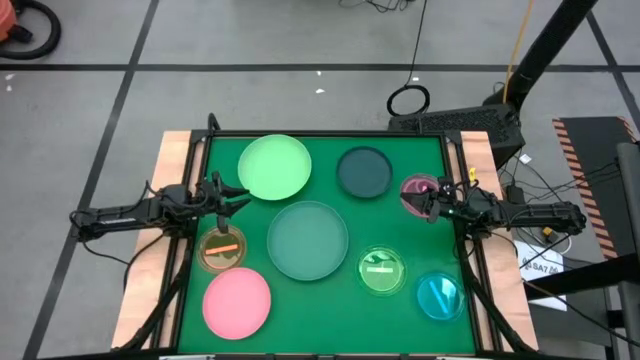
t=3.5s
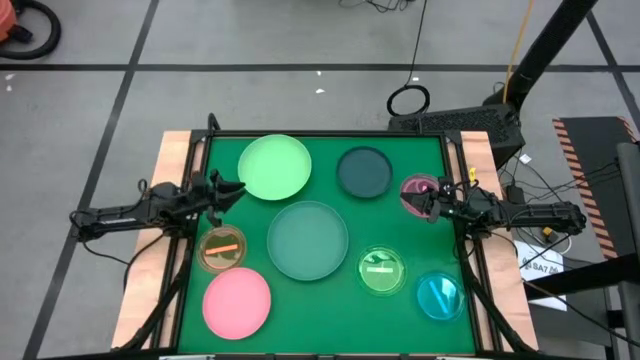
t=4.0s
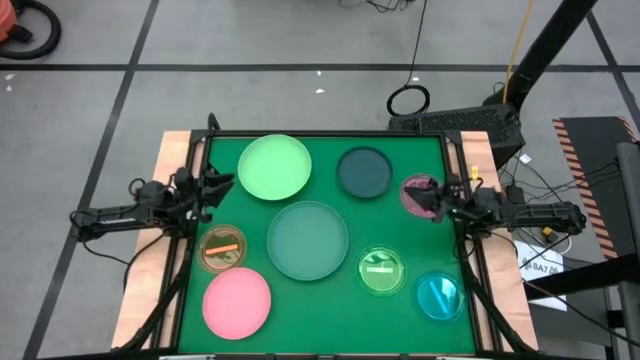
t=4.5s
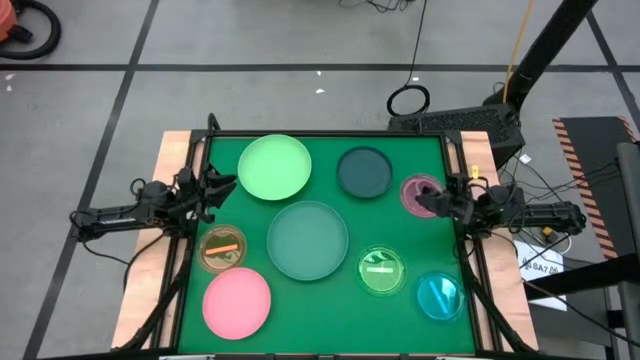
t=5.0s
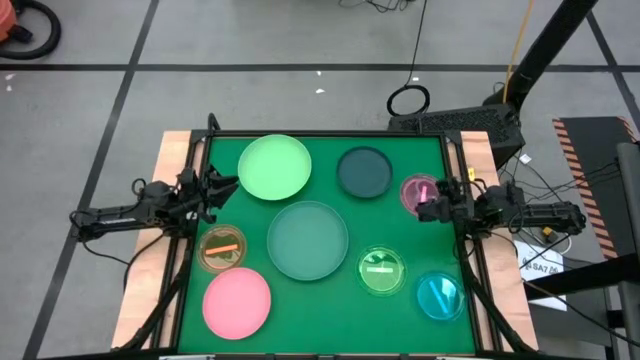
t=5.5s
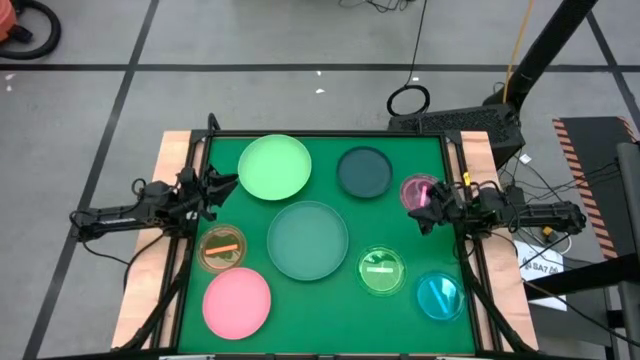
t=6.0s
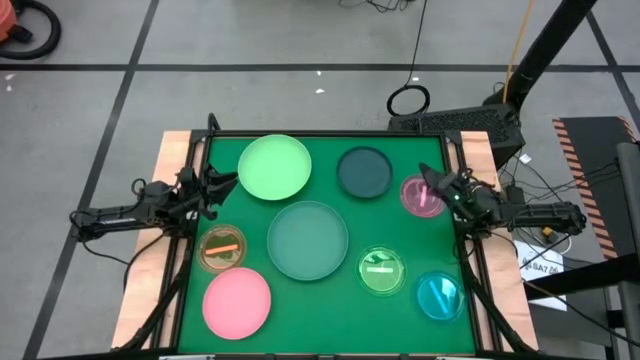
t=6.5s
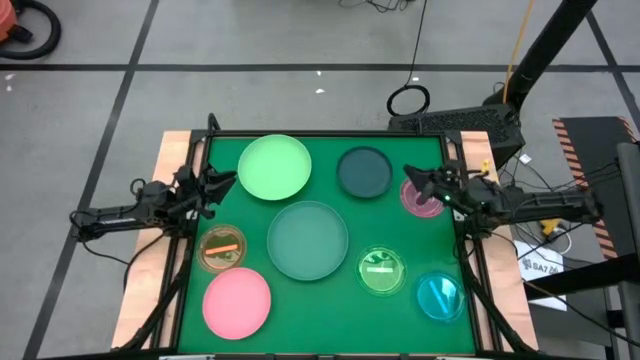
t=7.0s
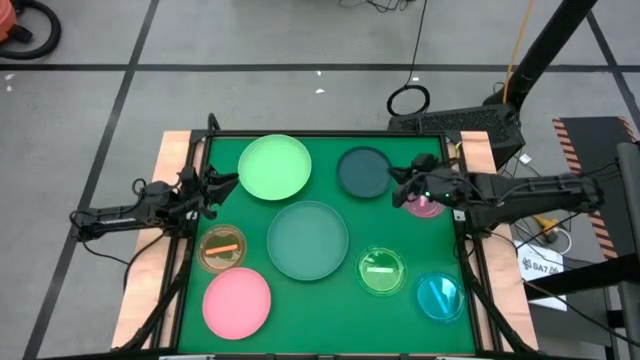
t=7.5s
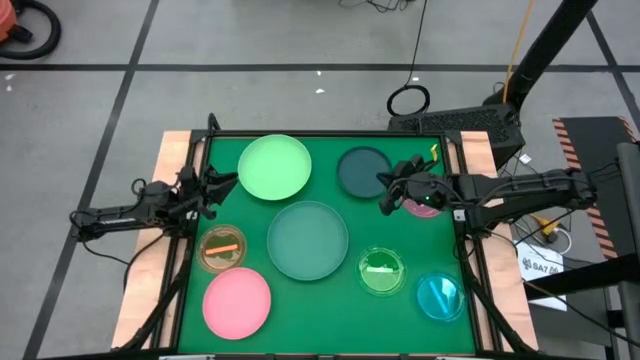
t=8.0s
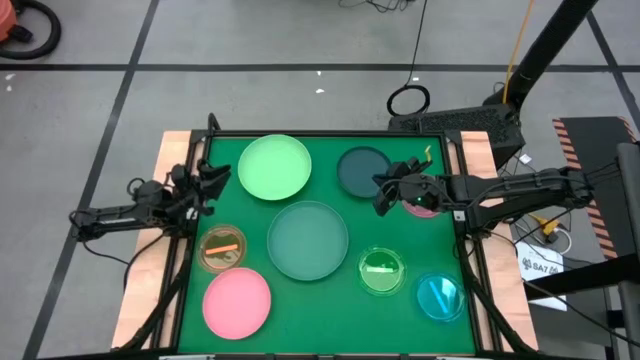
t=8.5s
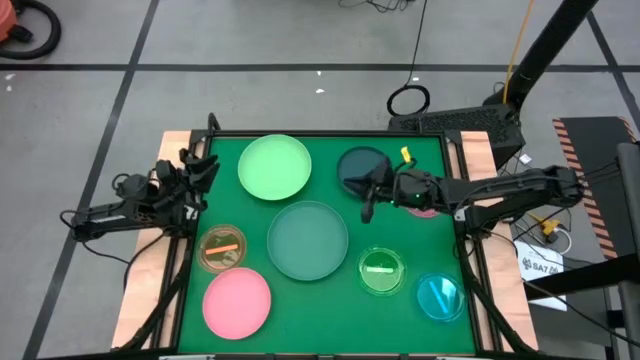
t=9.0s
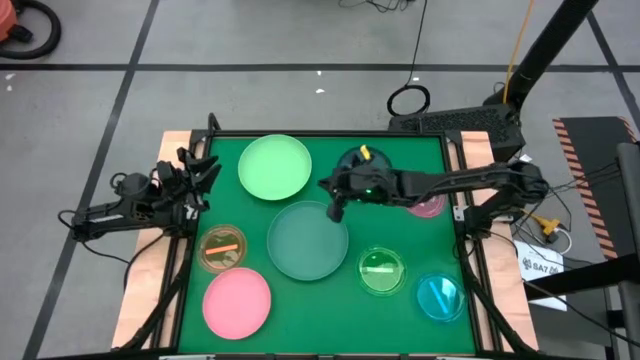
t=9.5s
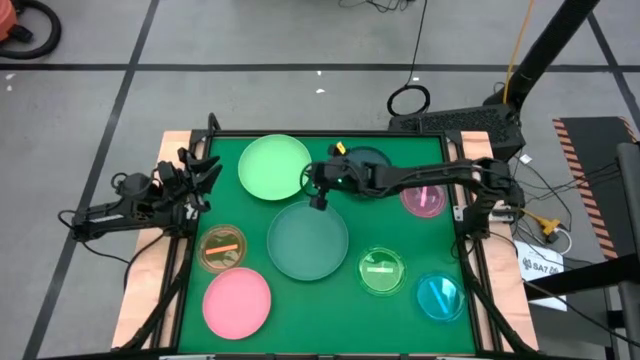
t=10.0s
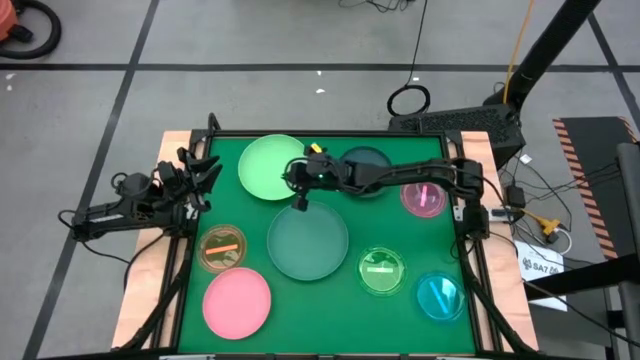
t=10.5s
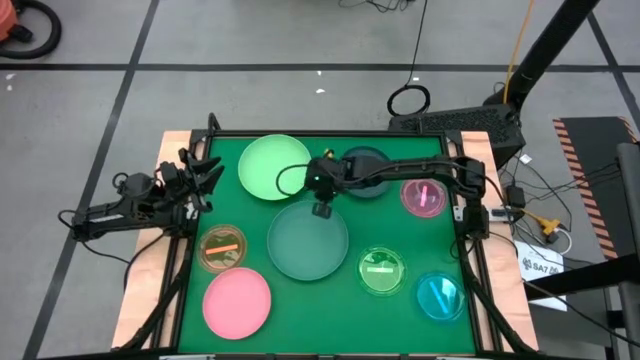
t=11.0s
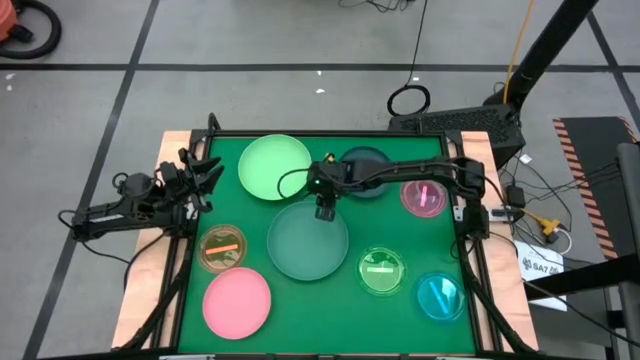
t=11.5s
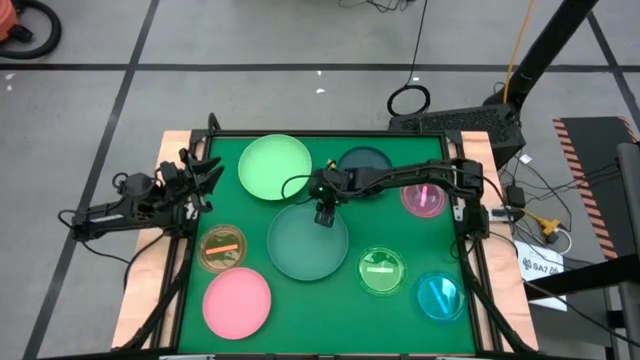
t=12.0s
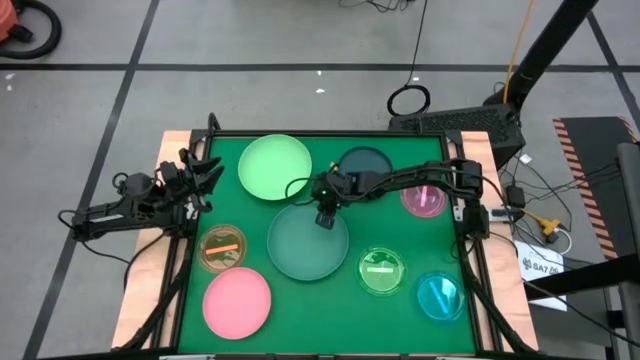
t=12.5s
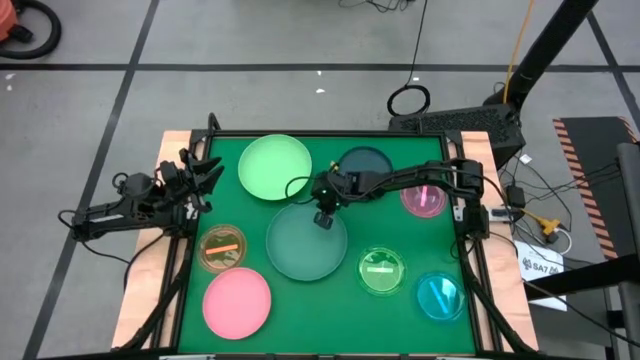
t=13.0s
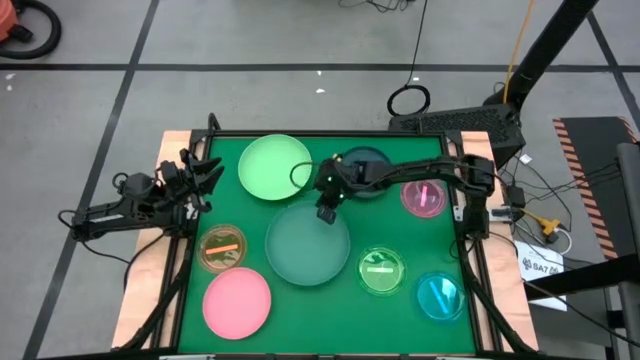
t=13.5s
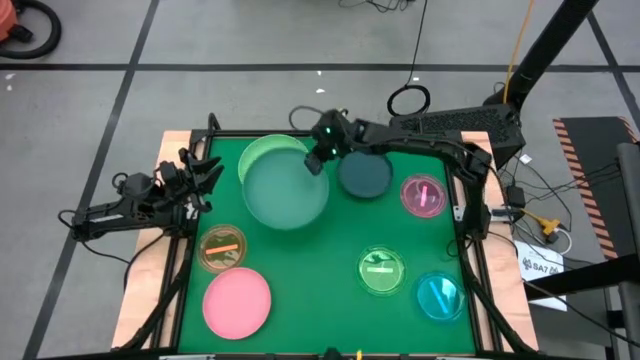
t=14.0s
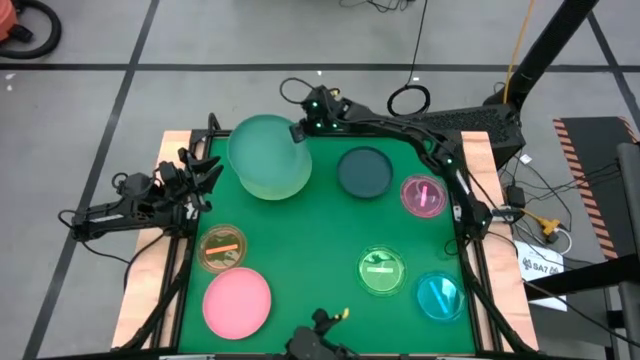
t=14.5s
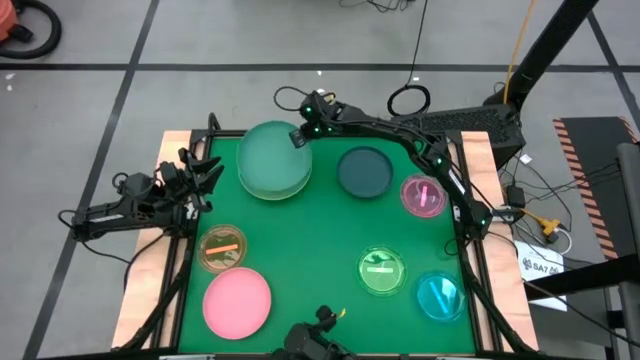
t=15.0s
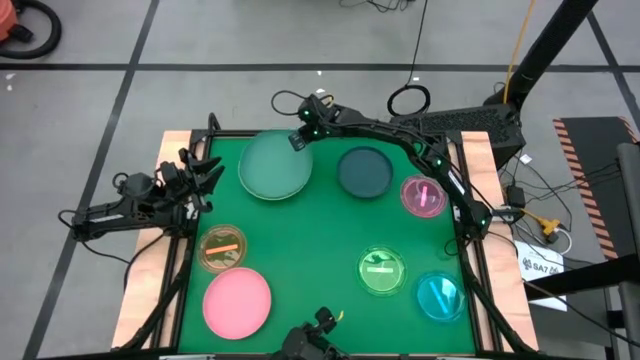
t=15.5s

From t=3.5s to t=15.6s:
Task: Stack plastic plates
Stack the dark green plate on top of the light green plate

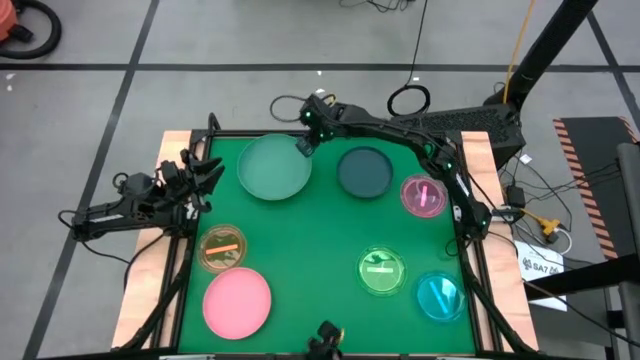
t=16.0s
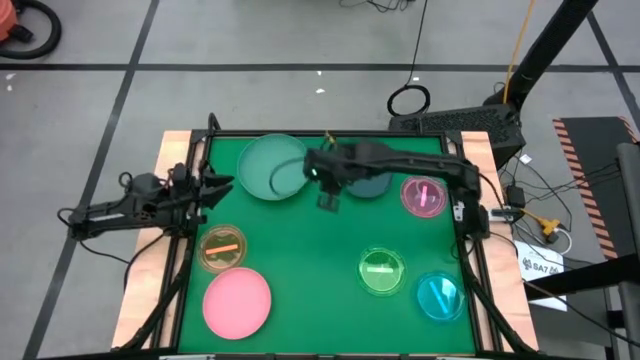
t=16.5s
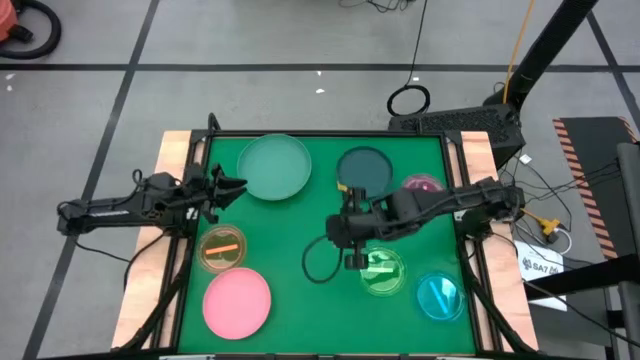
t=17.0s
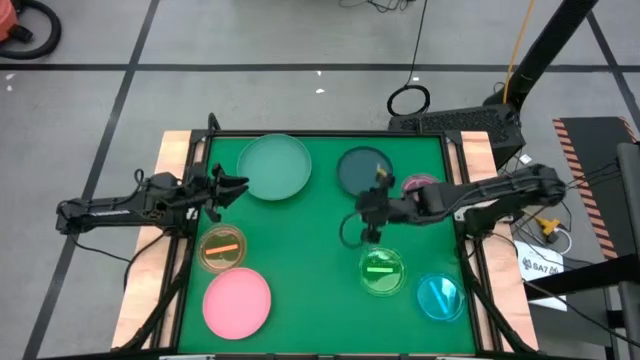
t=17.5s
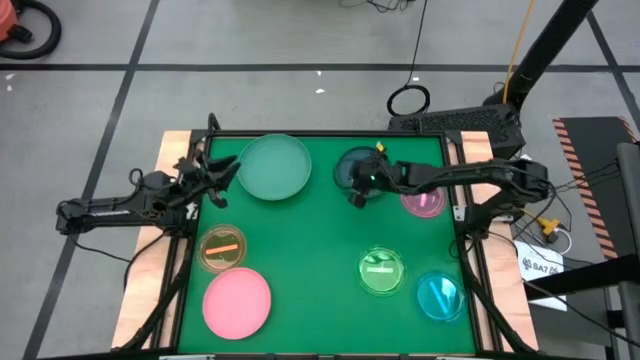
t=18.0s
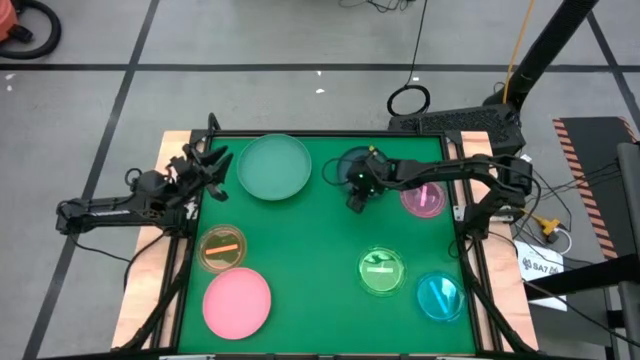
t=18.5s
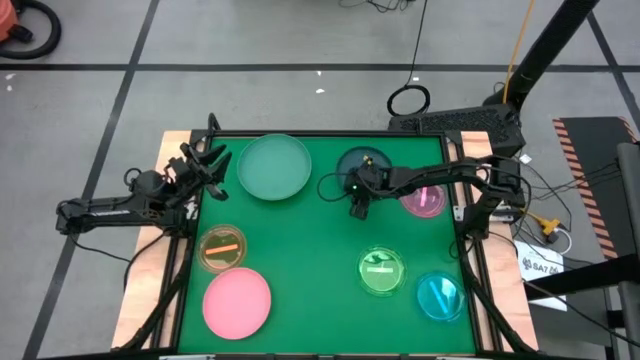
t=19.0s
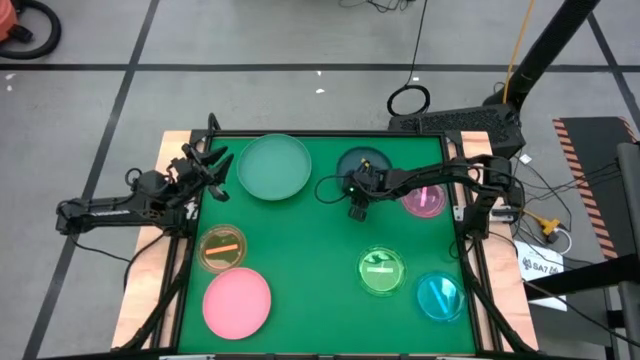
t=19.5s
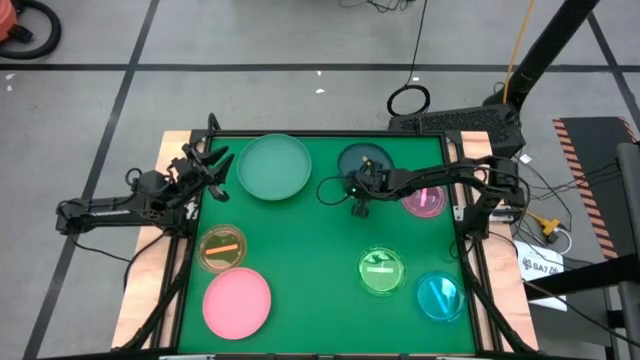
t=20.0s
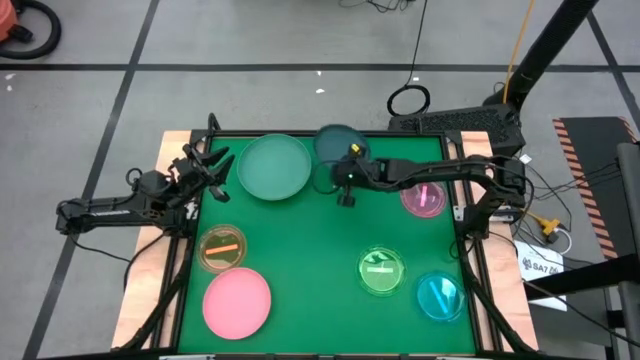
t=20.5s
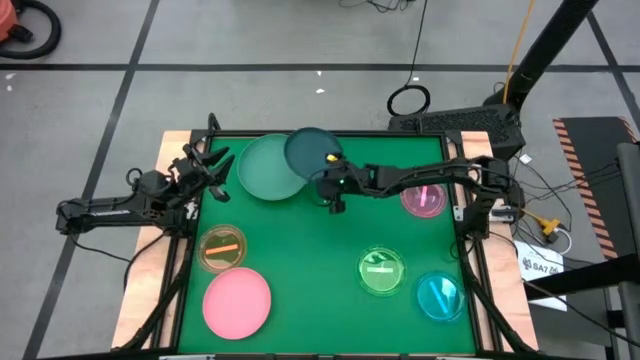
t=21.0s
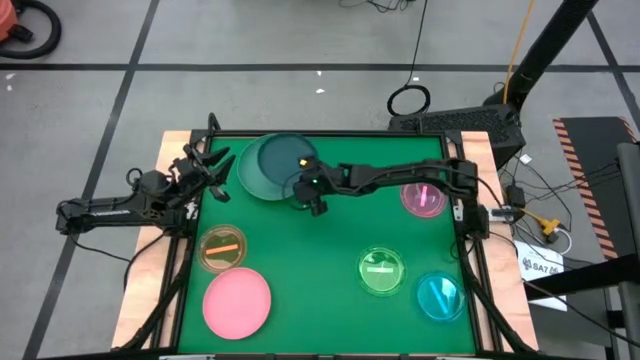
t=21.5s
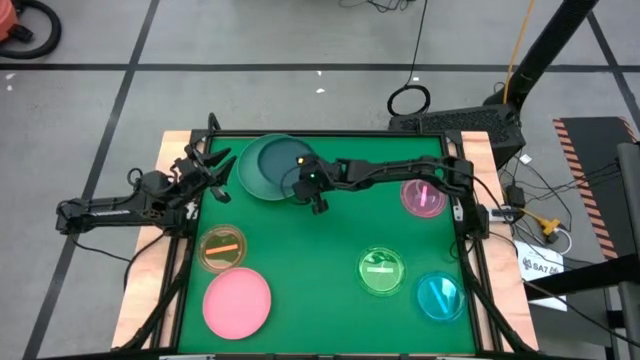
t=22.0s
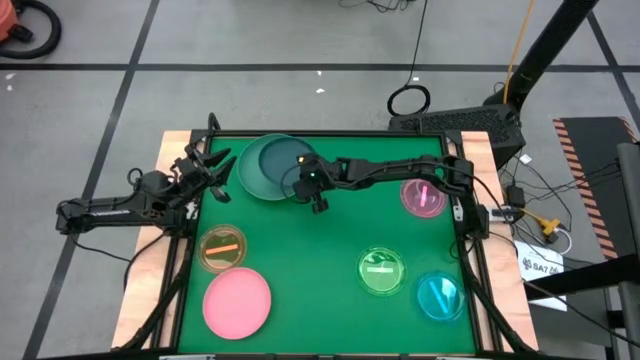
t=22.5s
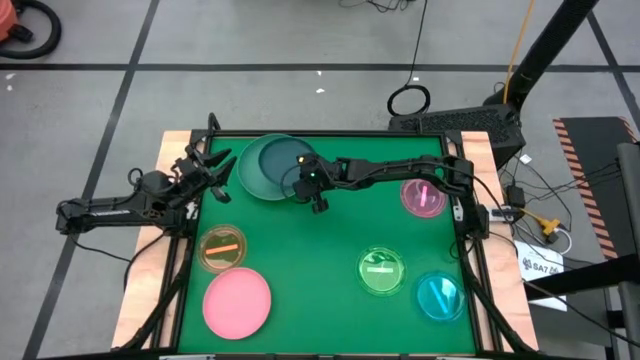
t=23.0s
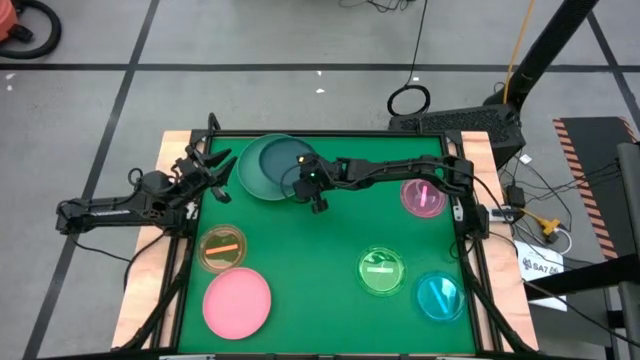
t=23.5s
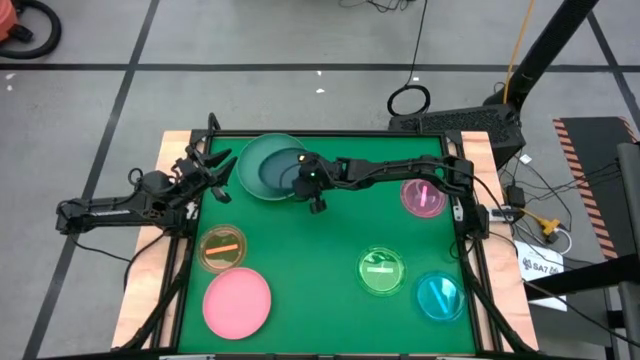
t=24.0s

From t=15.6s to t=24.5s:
Stack the dark blue plate on top of the dark green plate

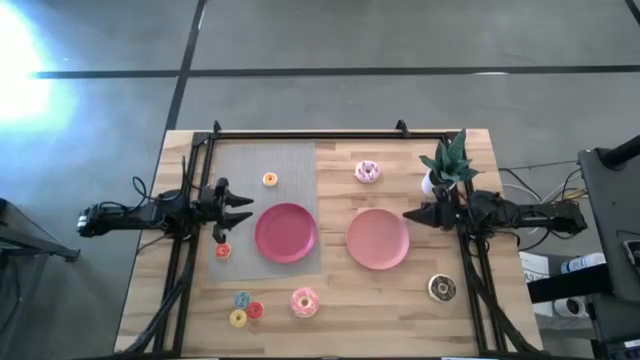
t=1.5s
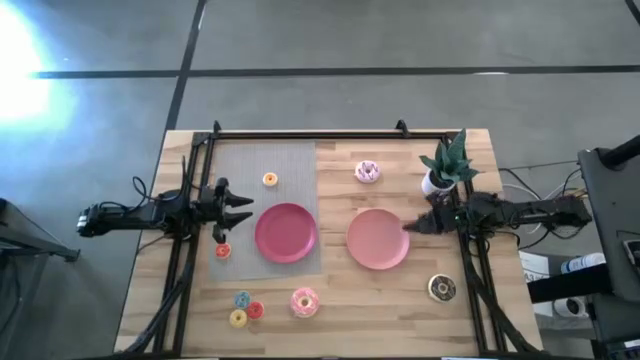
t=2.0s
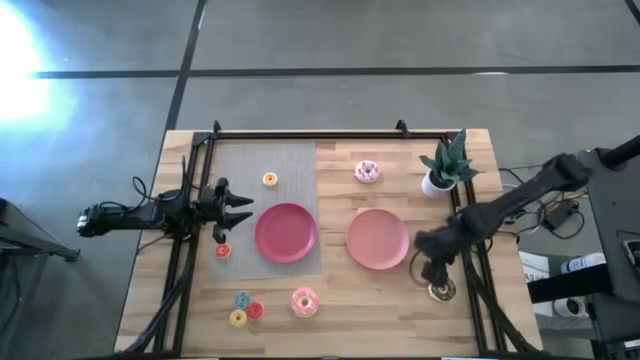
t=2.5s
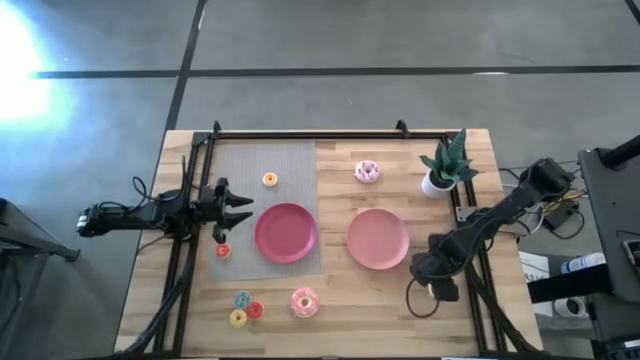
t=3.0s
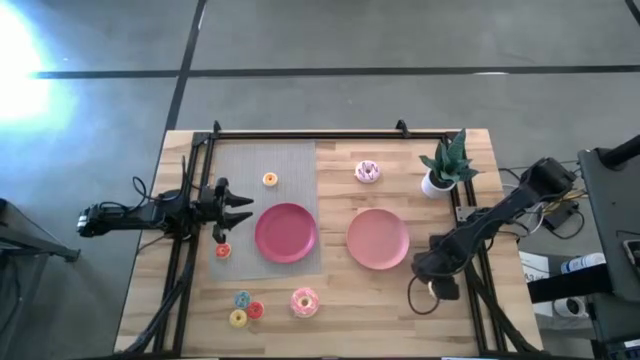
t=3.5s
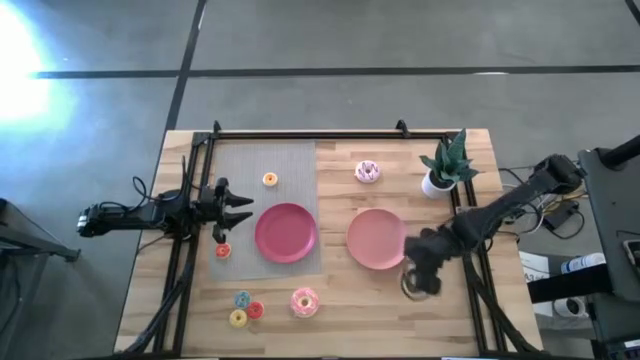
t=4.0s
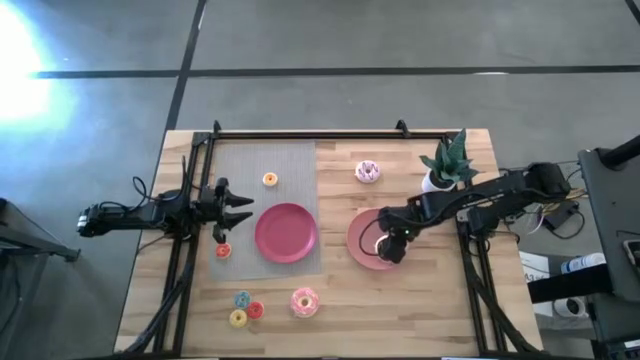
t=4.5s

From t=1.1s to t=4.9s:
Task: Pick & Place donuts
Put the large black donut on the light pink plate
